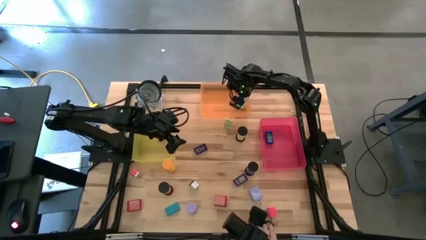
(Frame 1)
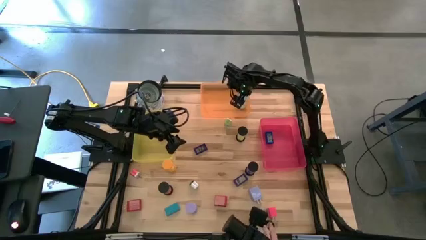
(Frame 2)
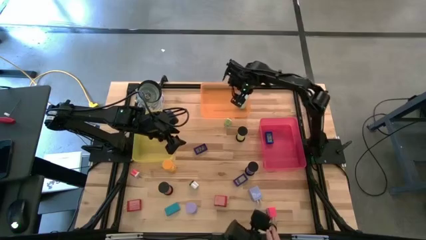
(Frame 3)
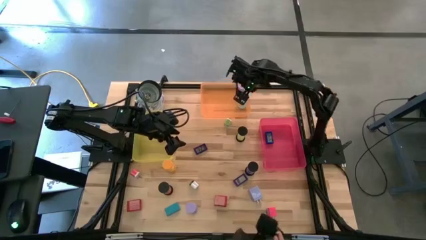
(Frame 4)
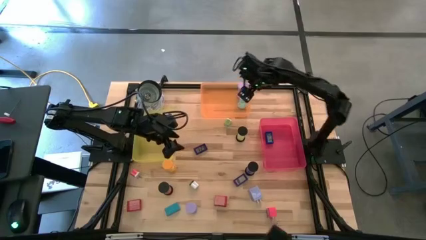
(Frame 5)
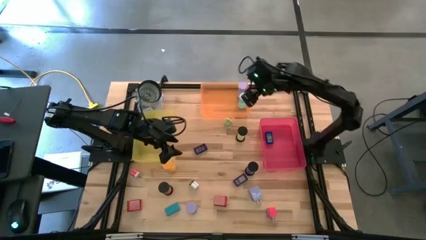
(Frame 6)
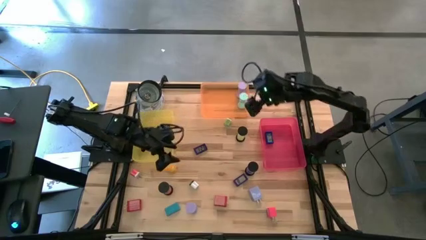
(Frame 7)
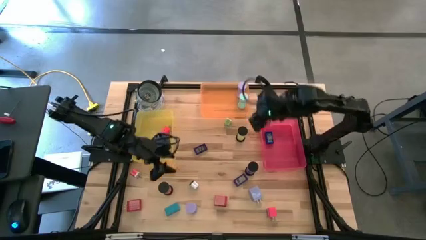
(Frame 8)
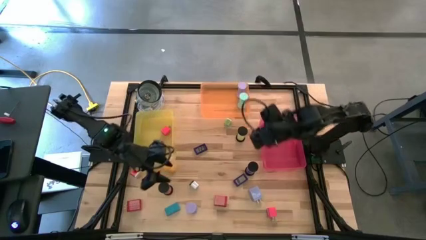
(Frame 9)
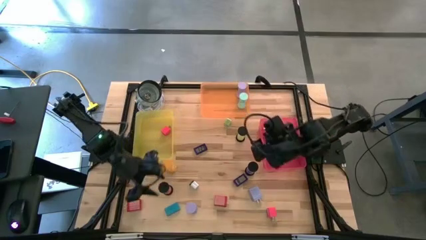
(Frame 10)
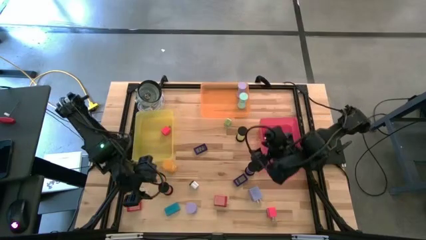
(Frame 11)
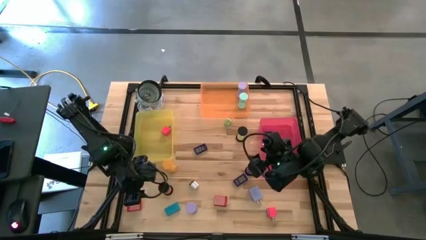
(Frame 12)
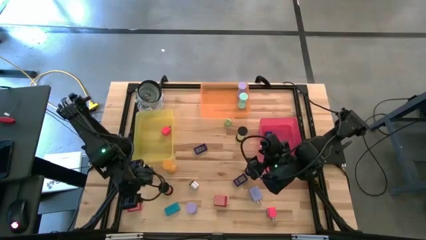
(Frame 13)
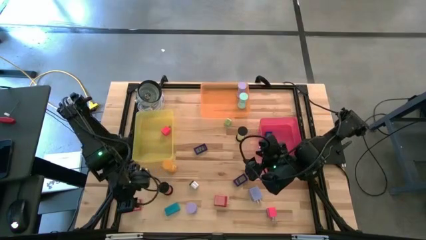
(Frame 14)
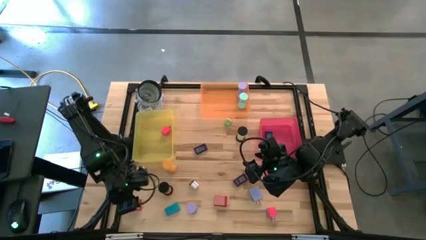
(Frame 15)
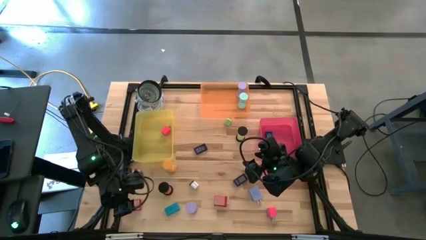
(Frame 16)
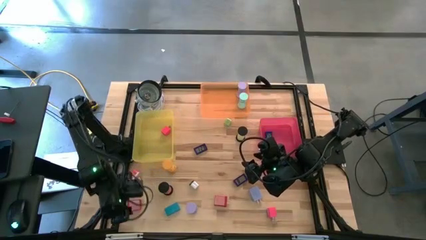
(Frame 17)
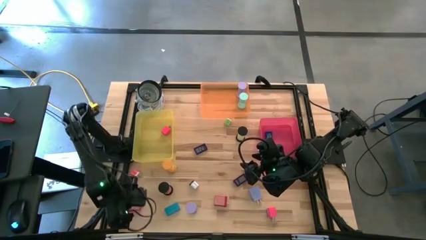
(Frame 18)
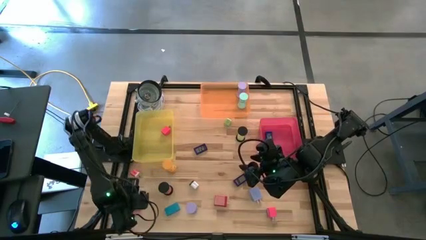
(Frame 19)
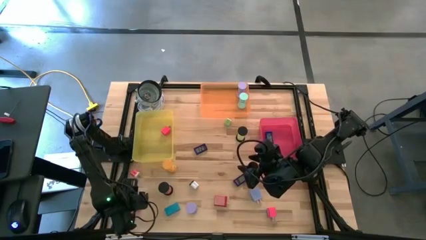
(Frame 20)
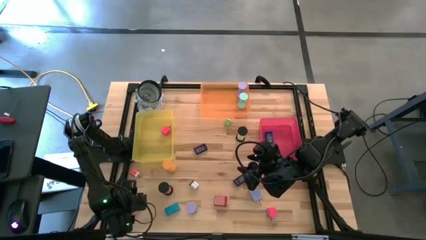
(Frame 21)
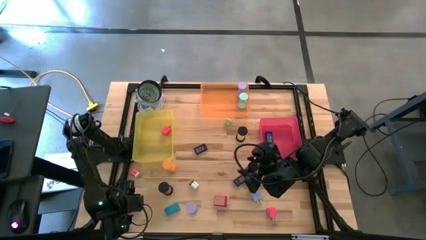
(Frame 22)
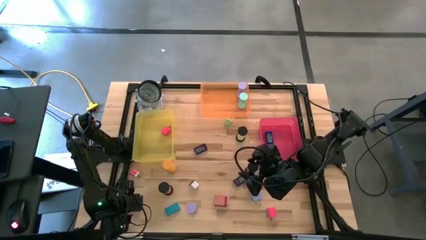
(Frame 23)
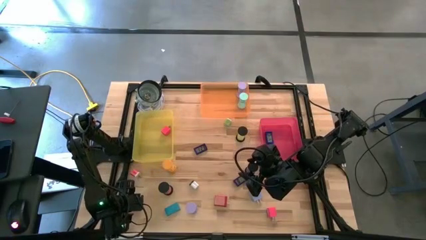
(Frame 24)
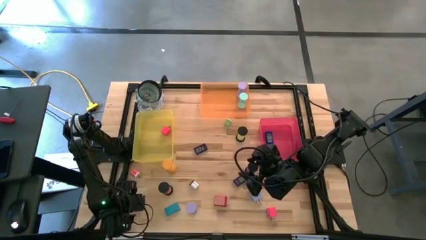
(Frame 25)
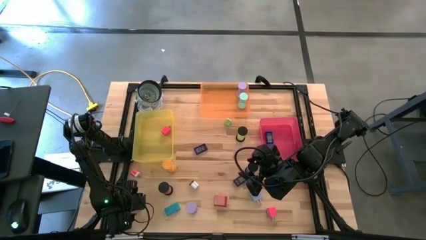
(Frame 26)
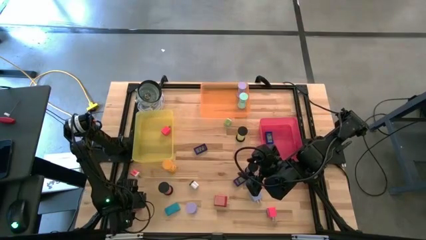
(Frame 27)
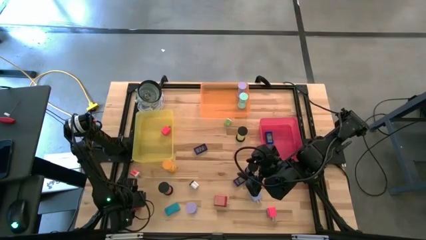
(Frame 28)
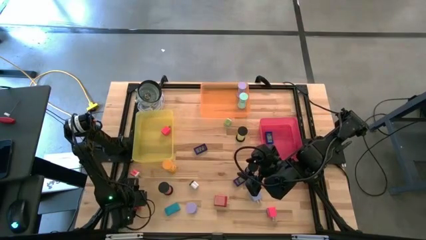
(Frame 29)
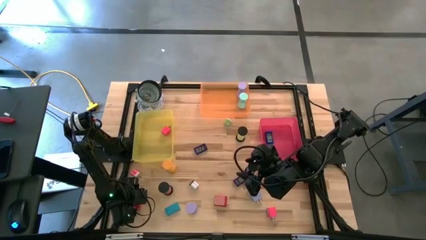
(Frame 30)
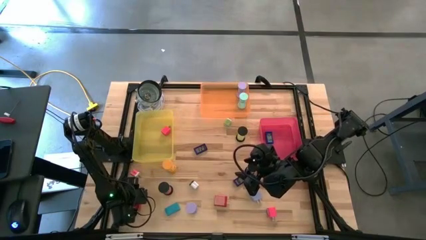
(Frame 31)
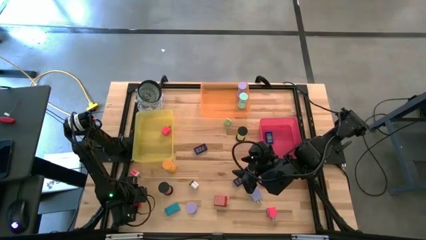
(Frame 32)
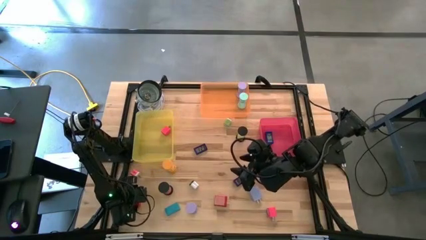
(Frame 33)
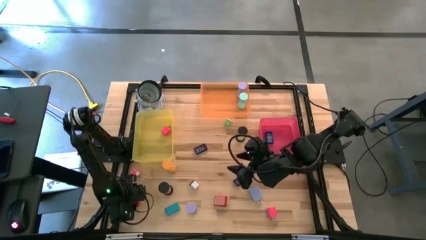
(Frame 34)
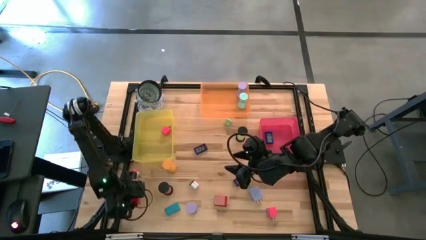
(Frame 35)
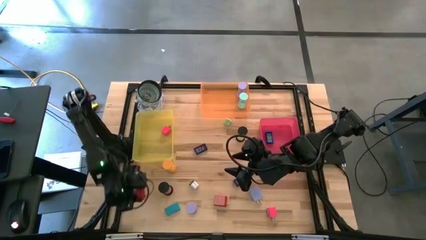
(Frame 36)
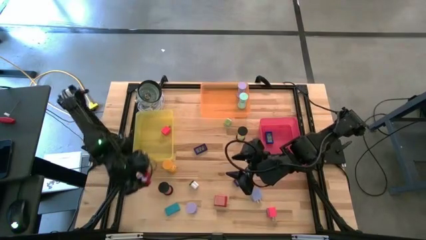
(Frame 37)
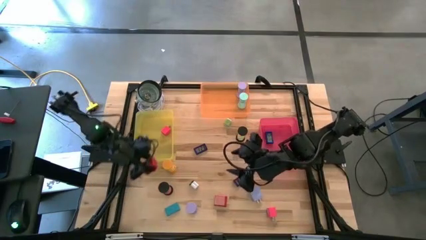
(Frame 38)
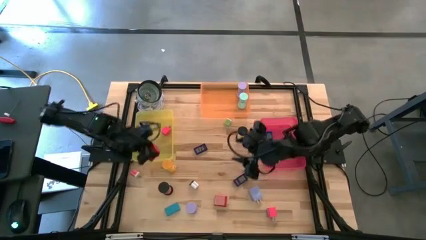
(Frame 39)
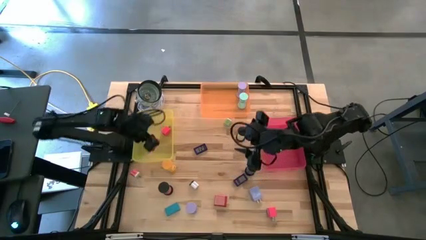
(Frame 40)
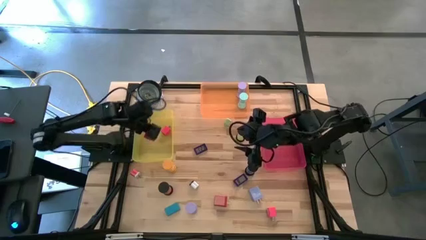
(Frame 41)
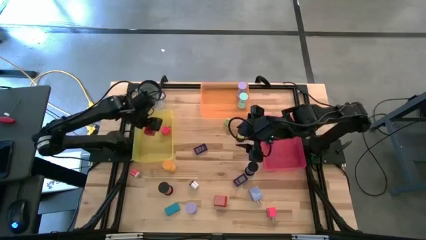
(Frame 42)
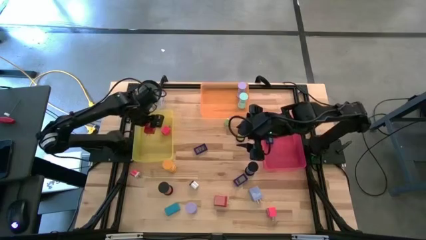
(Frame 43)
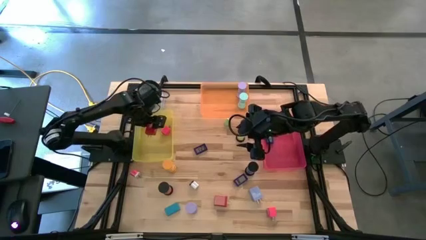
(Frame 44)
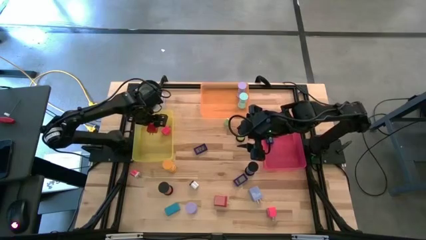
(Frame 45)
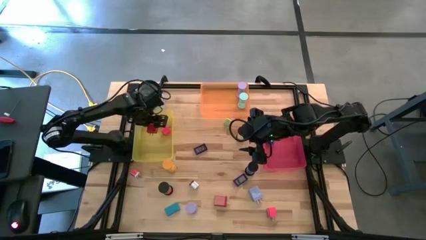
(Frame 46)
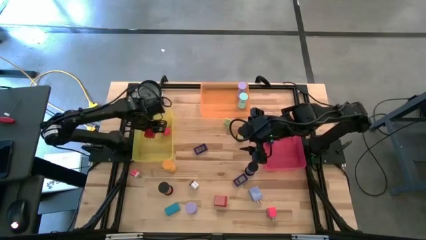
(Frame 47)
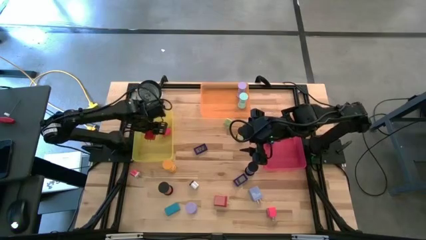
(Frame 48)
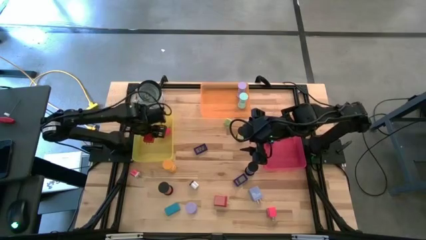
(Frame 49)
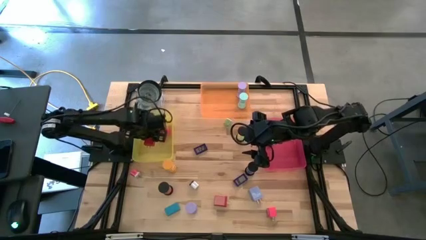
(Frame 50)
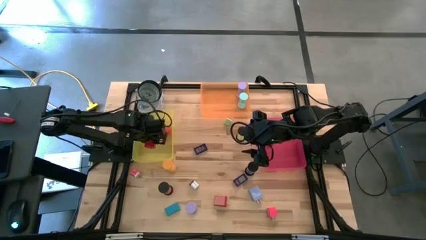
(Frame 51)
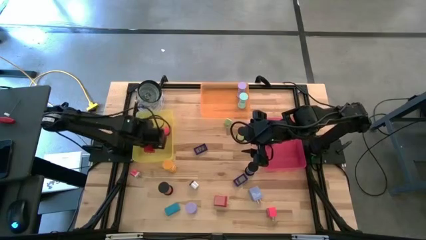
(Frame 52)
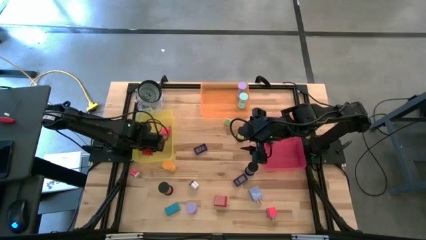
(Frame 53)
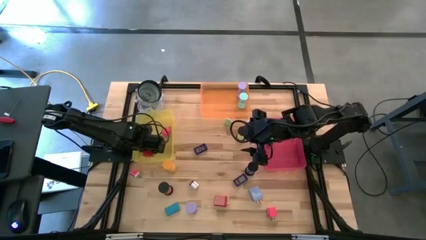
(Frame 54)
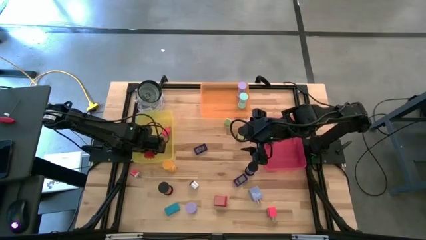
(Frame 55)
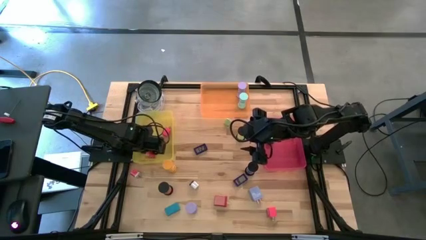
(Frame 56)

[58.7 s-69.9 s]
Task: Pick & Place Office items
Put the red charger in the green bin

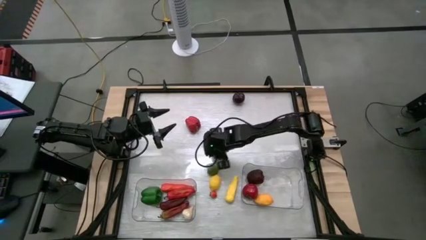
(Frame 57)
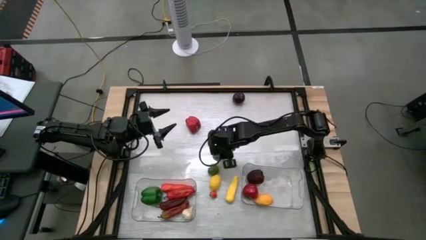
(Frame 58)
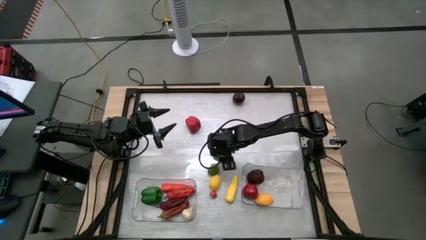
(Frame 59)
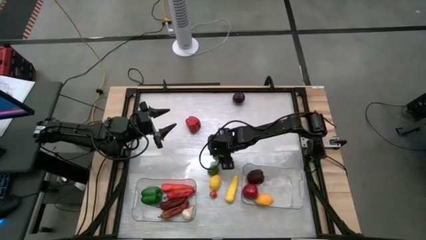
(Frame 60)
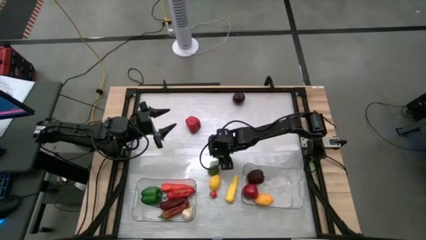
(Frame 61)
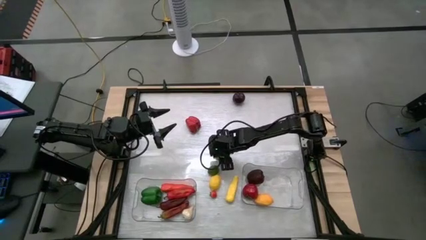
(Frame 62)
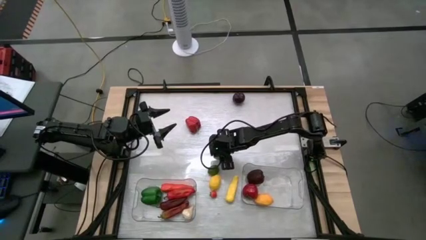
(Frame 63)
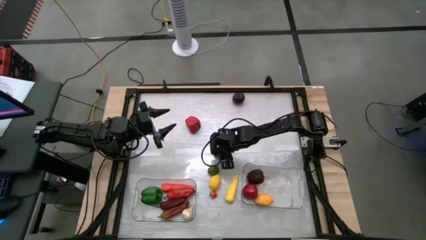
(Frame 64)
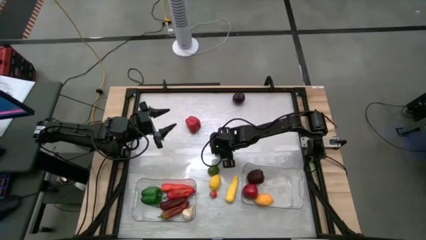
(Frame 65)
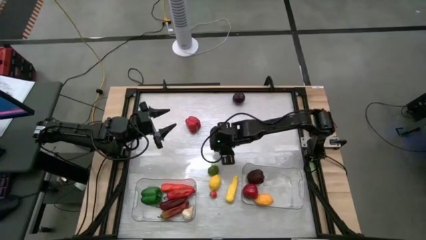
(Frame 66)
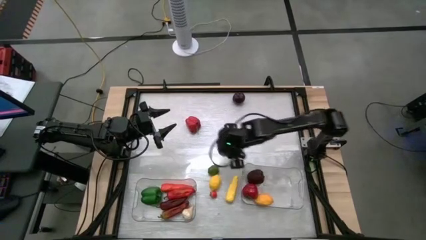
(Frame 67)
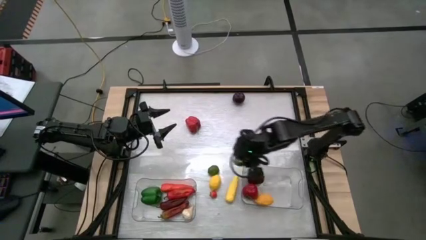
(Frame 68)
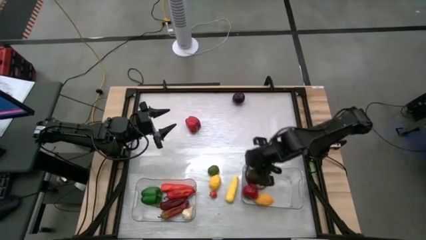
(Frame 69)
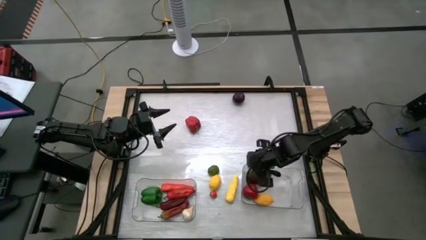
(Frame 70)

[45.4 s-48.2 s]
Task: Sort produce into baskets
Put the top green lemon into the right transparent bin

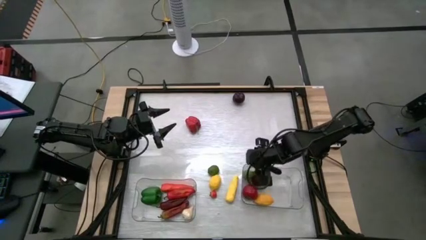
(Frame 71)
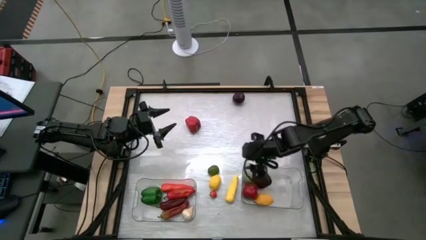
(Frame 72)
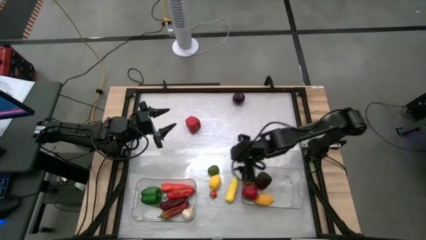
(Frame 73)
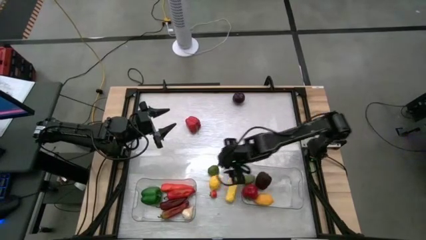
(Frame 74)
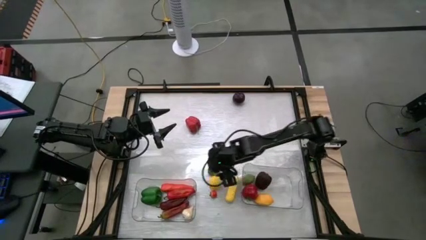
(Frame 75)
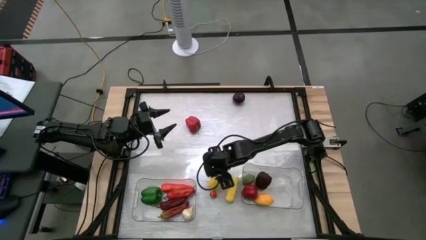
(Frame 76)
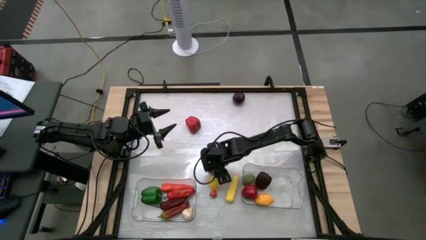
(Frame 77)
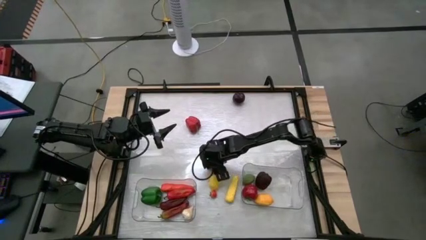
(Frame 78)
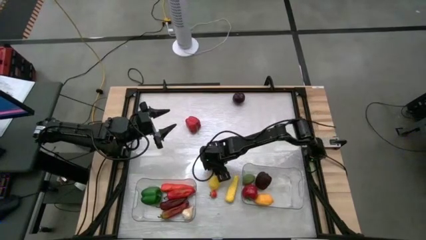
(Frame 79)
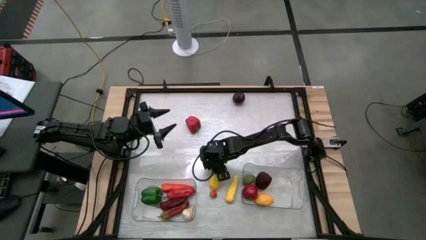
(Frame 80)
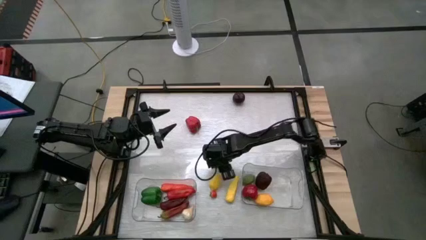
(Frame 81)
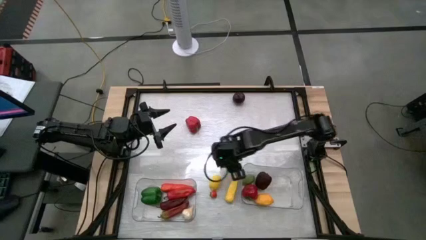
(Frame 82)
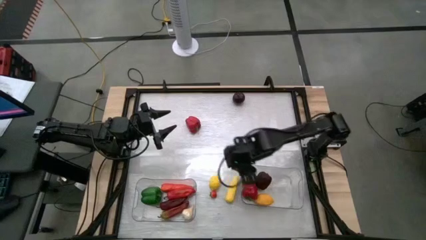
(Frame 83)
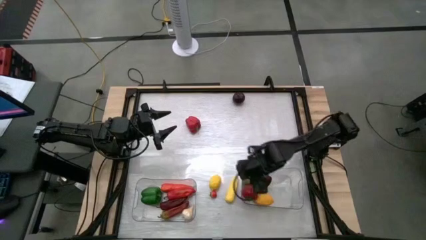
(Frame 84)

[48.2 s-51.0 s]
Put the green lemon into the right transparent bin
